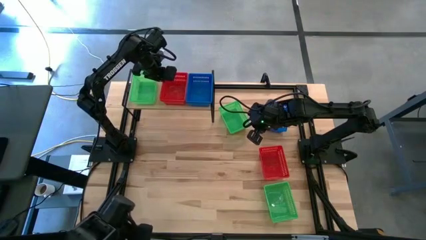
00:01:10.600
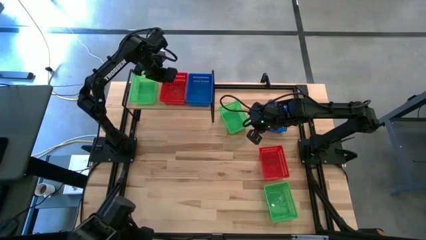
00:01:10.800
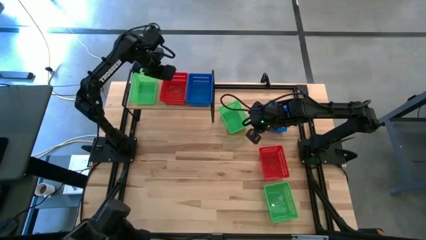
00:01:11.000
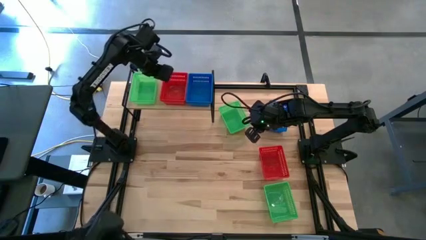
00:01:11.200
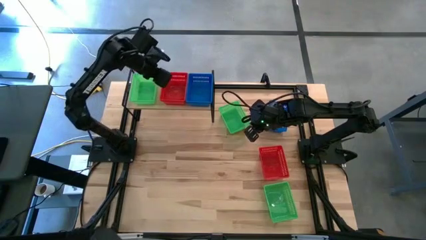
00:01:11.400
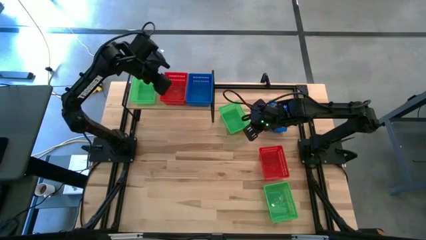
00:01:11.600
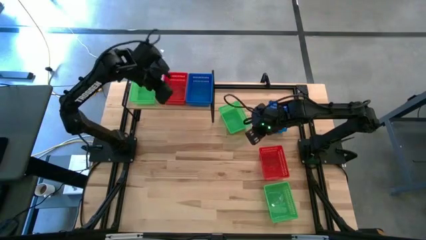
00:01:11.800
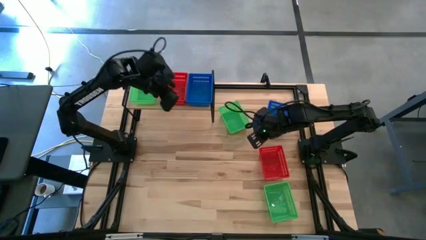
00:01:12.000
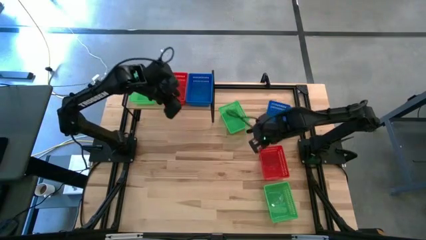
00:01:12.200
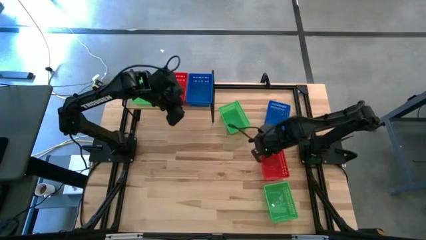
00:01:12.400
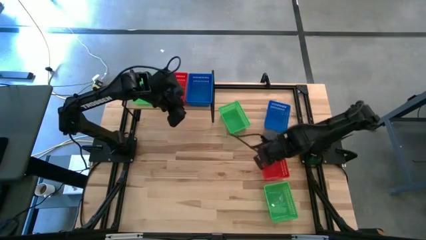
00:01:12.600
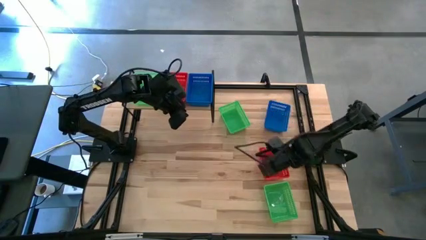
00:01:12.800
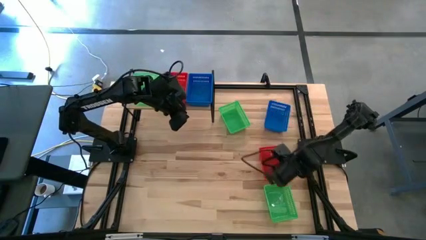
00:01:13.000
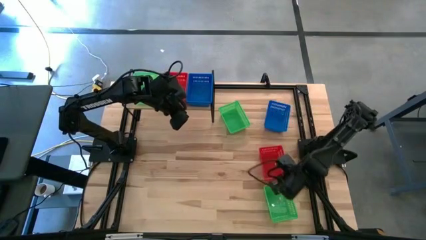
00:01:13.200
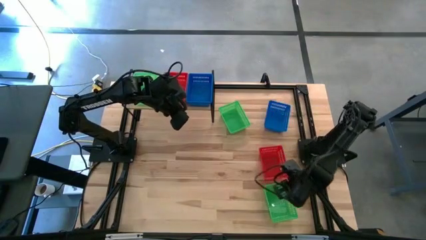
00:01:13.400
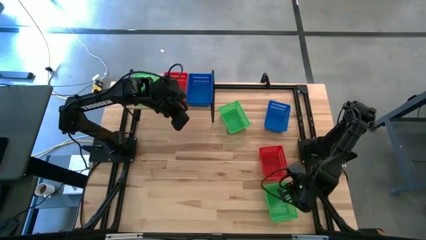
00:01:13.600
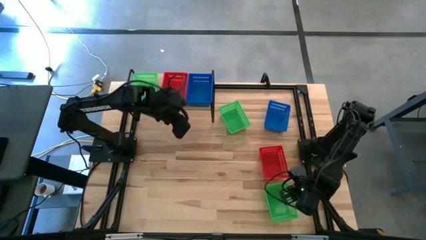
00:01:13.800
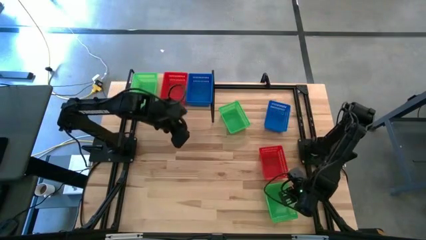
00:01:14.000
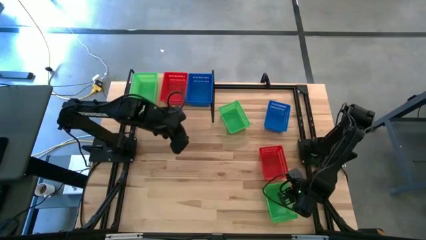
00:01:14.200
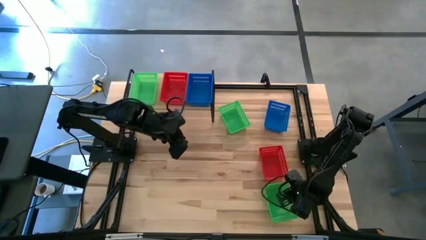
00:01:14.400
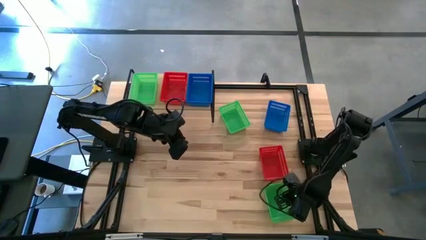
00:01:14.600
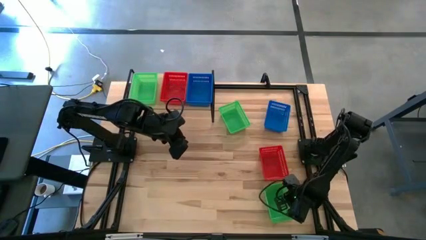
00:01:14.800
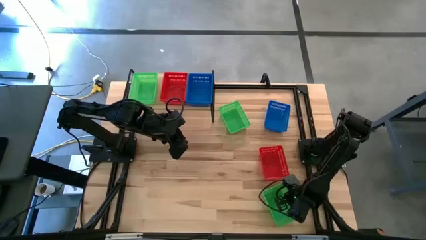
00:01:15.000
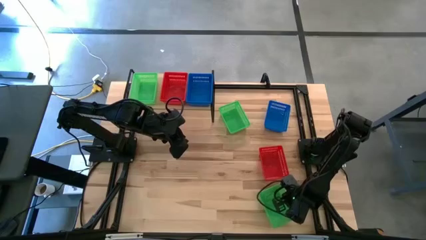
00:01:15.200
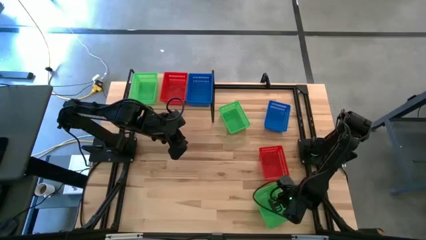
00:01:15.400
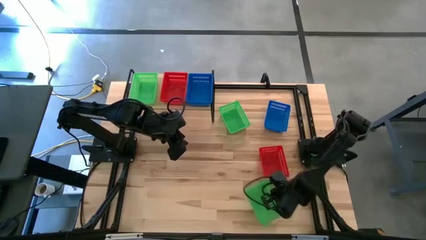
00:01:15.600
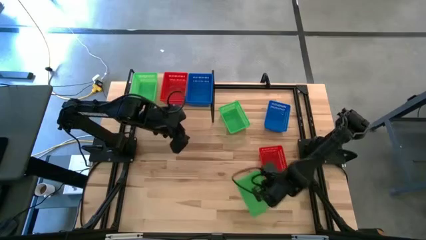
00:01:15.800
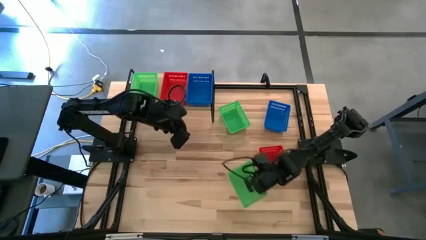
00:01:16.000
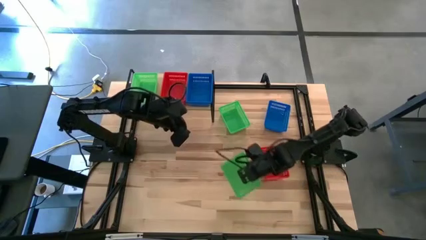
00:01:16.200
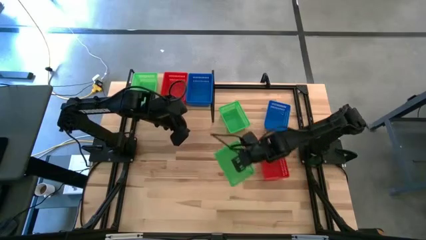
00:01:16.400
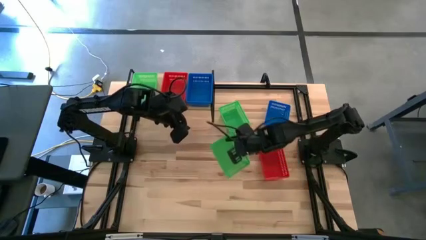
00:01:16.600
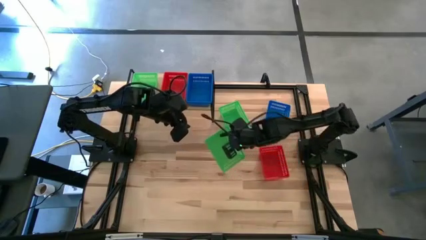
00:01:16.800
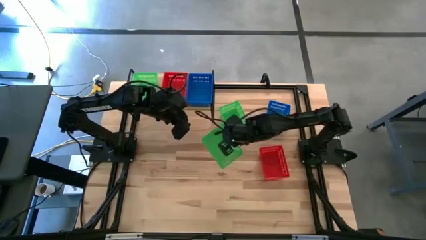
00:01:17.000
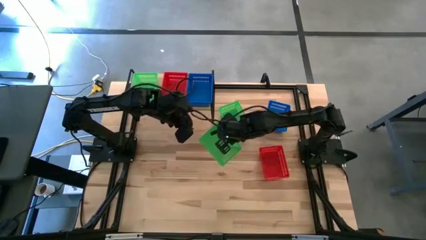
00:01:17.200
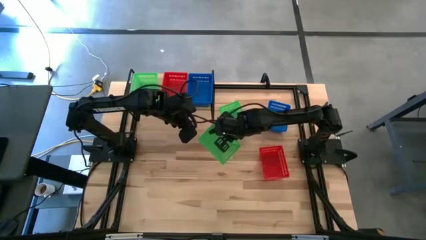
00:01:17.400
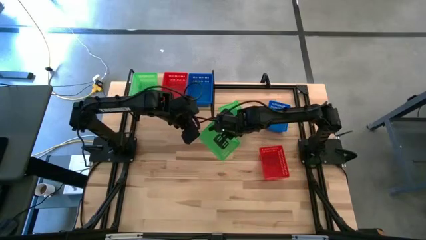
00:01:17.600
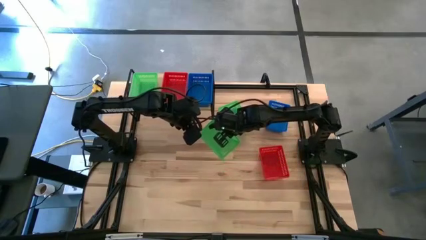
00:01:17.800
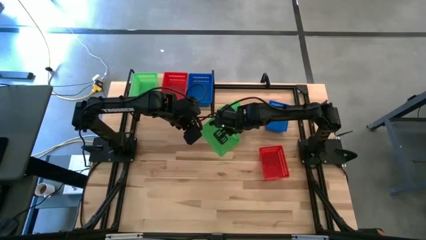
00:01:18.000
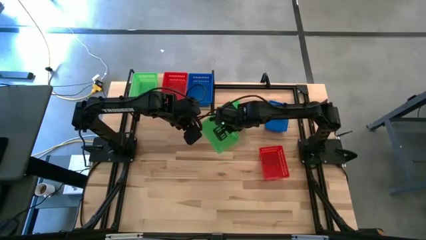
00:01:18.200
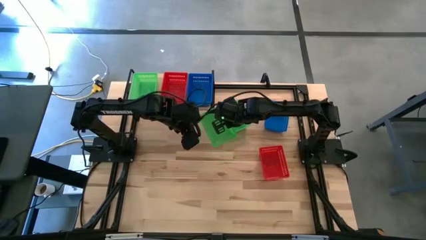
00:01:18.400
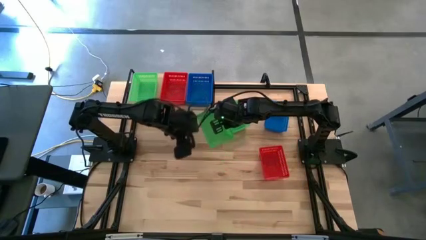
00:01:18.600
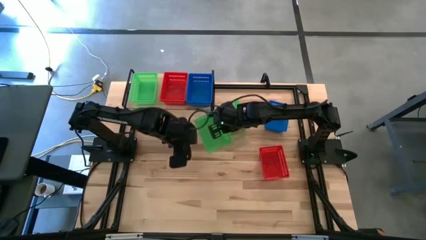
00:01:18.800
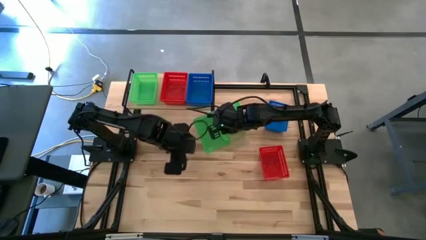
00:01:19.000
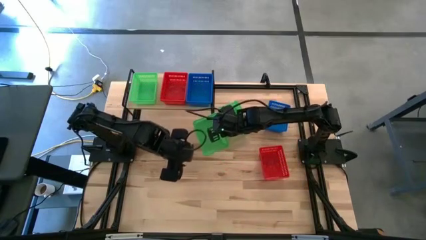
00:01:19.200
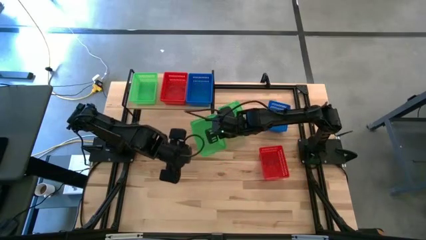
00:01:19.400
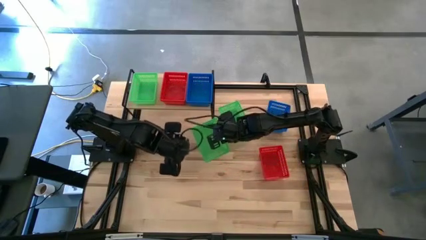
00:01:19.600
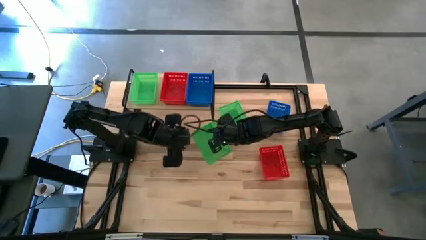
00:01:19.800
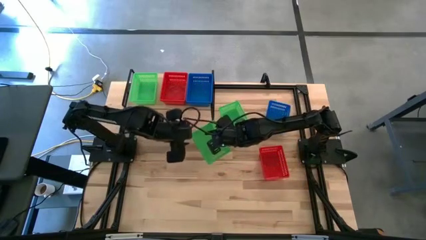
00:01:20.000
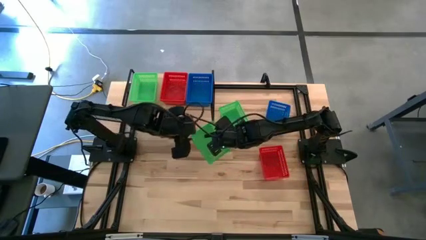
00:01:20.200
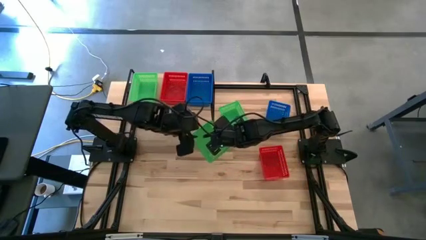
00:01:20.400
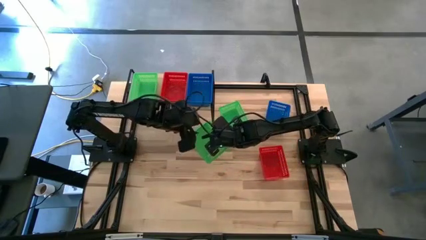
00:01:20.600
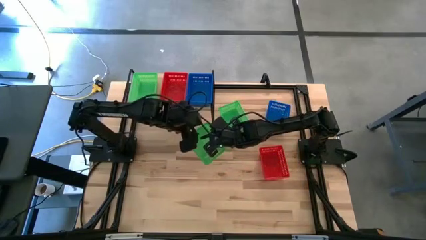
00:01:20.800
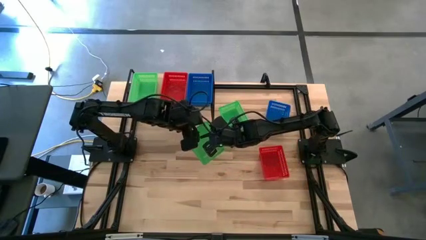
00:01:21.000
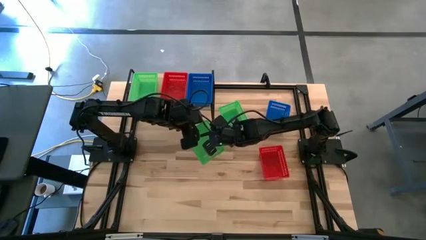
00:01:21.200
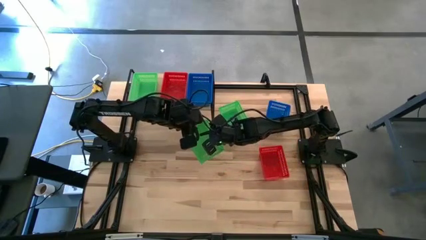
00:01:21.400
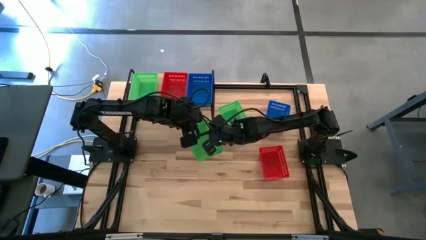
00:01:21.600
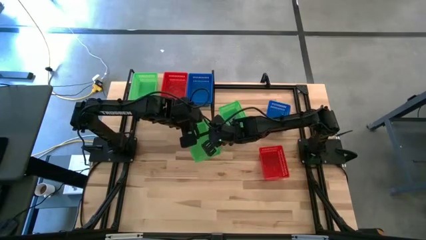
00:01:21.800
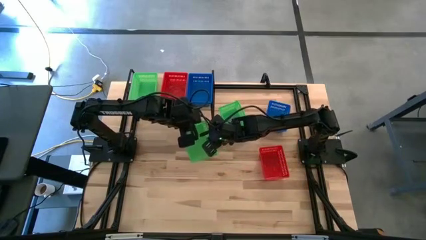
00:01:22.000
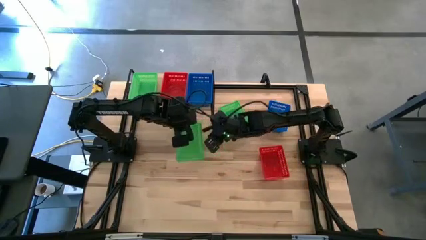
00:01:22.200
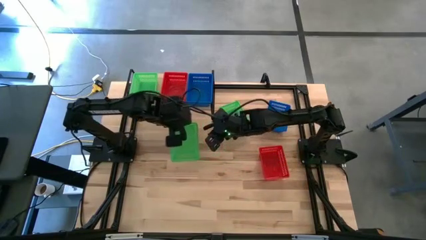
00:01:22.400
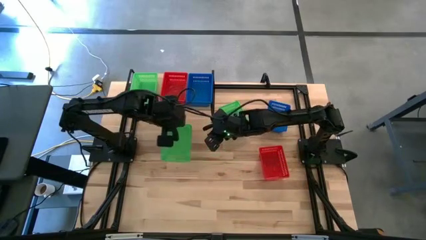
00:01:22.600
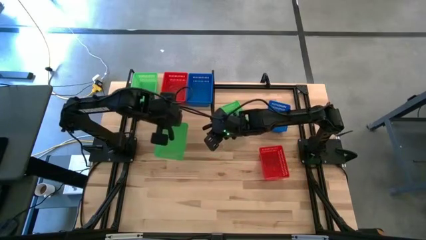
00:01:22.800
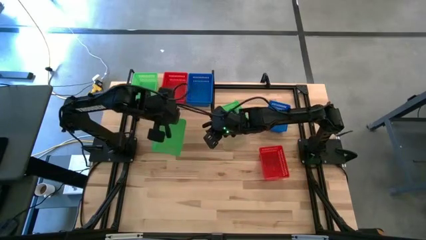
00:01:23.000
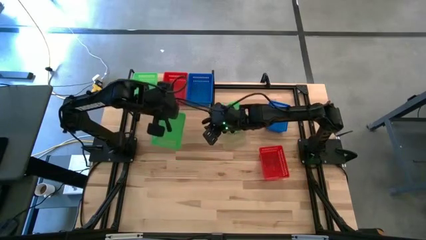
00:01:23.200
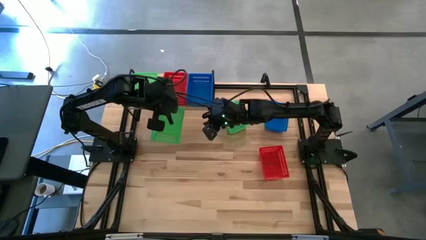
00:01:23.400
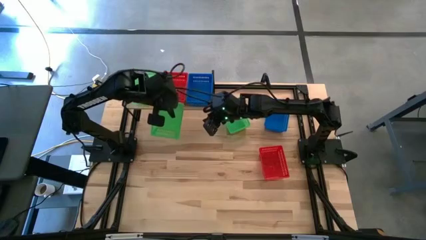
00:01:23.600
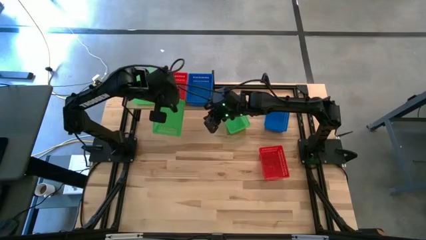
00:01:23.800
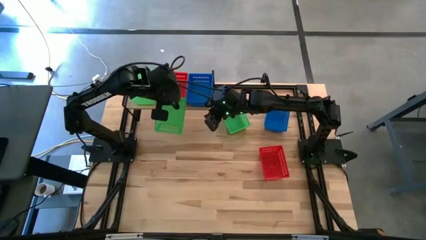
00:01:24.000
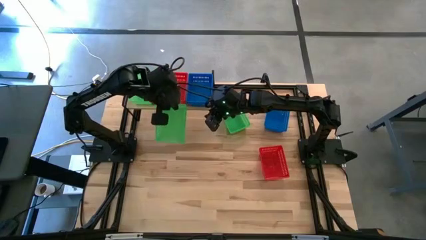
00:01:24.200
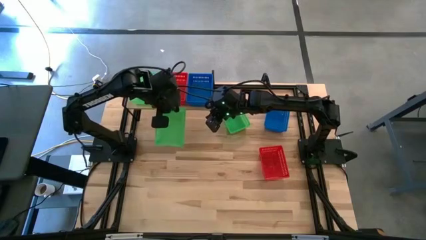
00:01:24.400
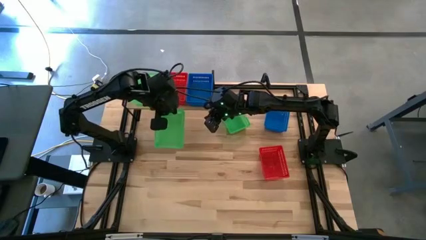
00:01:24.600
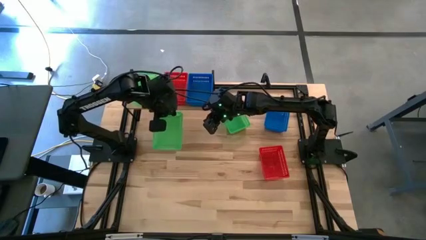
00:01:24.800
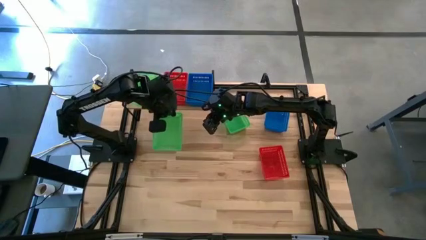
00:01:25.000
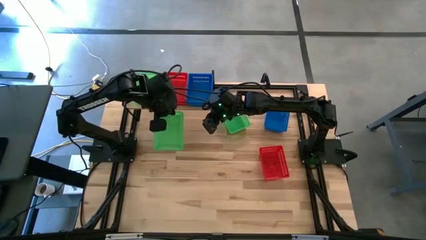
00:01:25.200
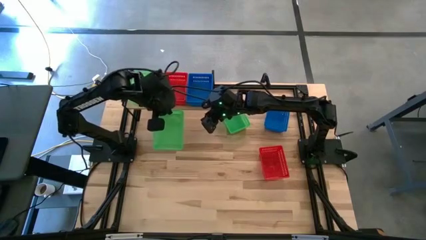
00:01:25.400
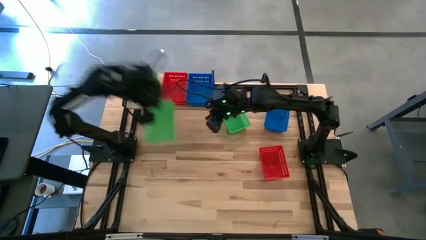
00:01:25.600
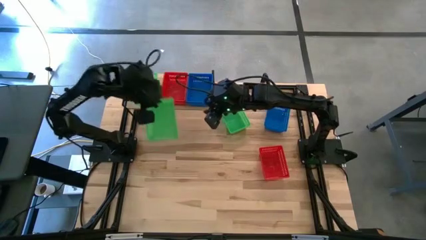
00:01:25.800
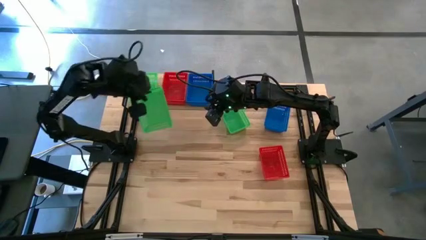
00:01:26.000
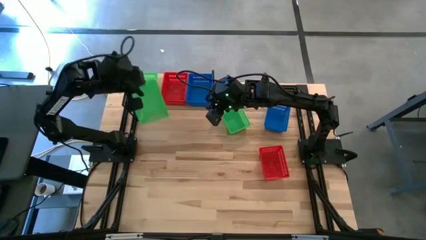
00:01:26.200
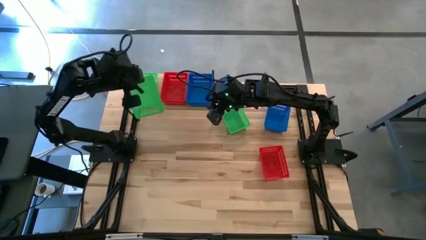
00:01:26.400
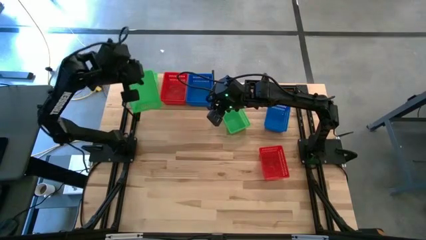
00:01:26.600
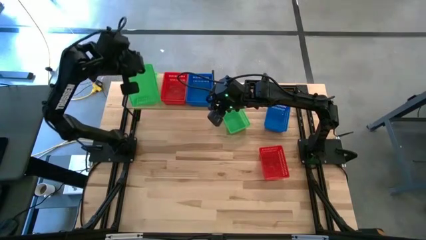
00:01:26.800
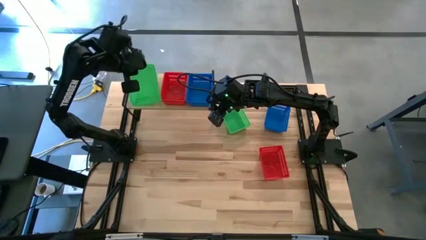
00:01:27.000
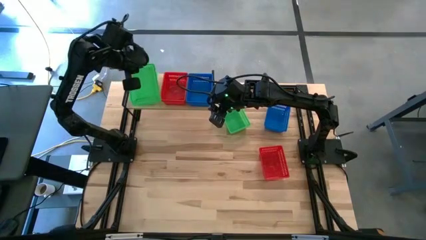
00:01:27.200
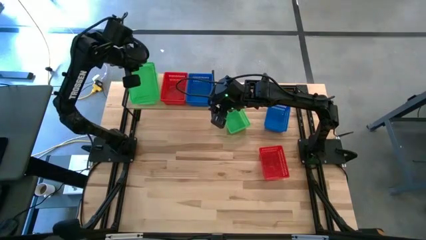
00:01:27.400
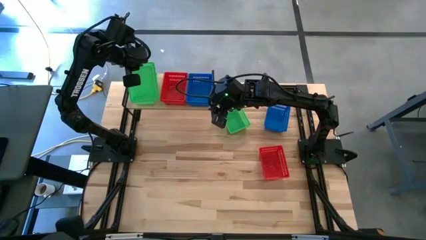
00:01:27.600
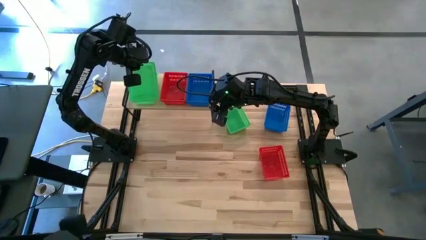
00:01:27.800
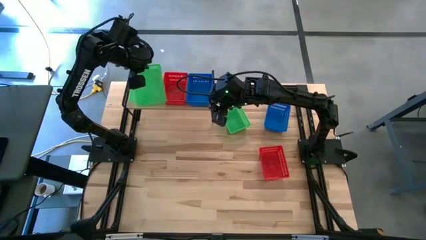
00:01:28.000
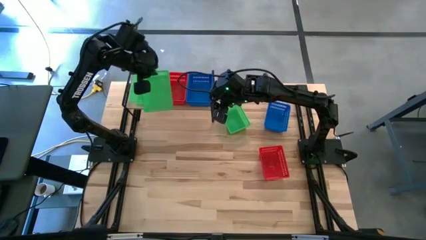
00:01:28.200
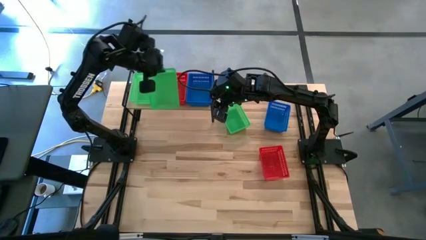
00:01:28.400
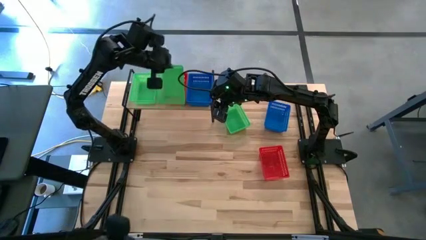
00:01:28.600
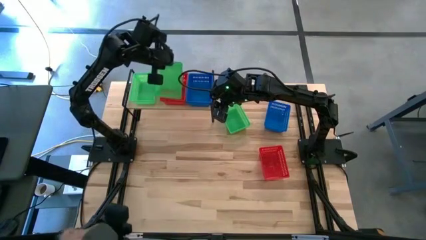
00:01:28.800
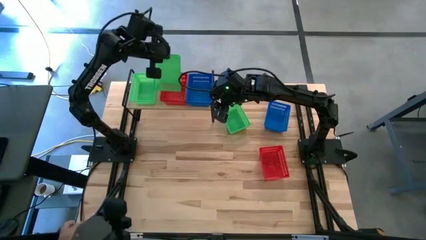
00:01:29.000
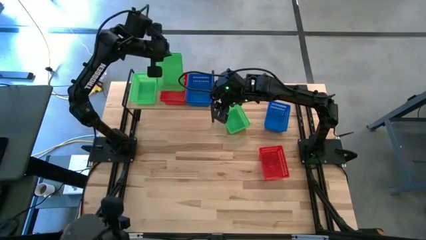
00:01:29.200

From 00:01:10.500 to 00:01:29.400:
Task: Stack baskets on shelf by color
Stack the bottom green basket on top of the green basket on the shelf
